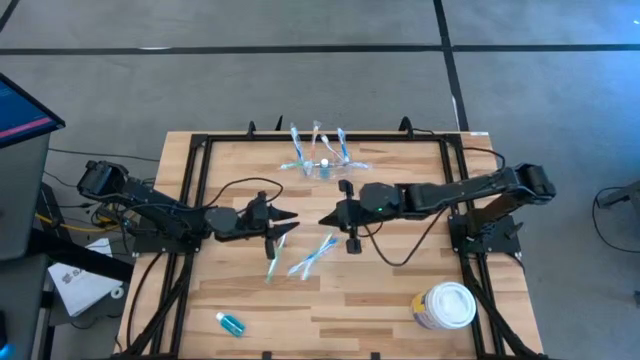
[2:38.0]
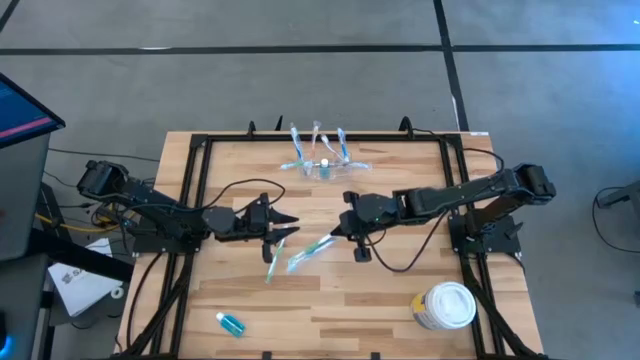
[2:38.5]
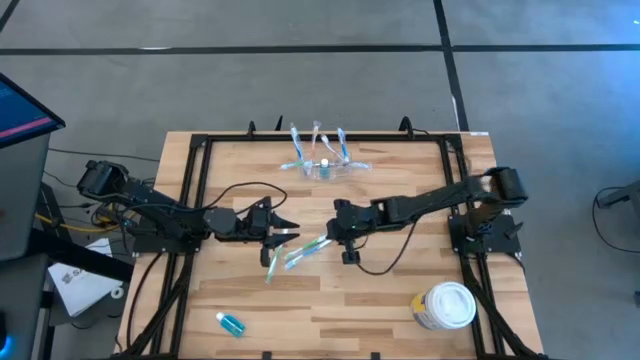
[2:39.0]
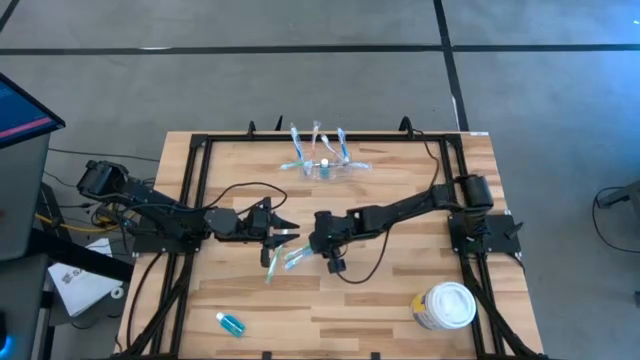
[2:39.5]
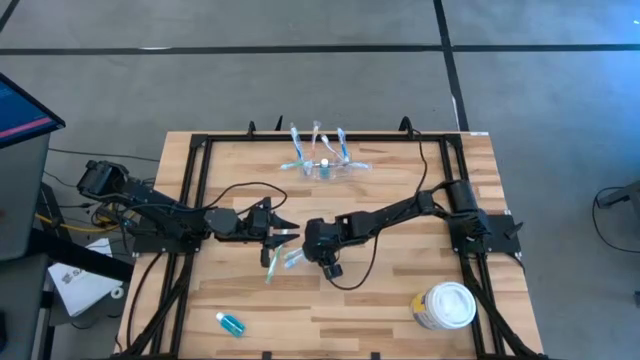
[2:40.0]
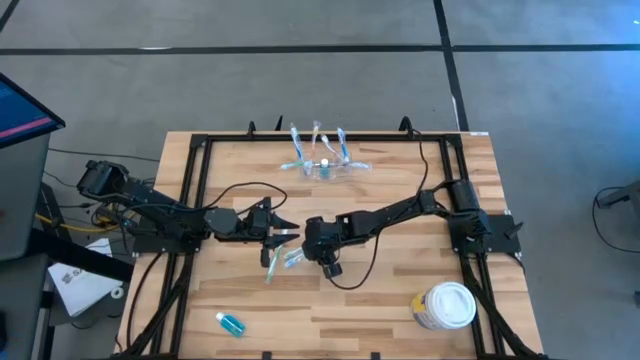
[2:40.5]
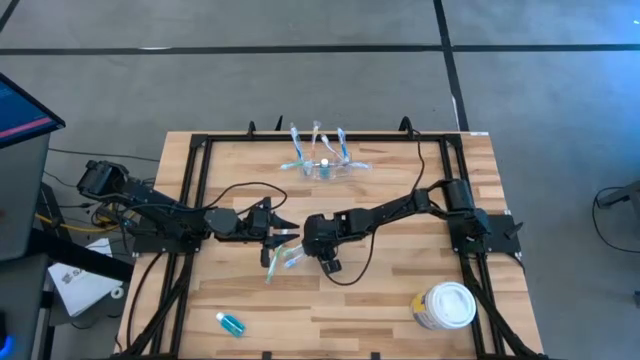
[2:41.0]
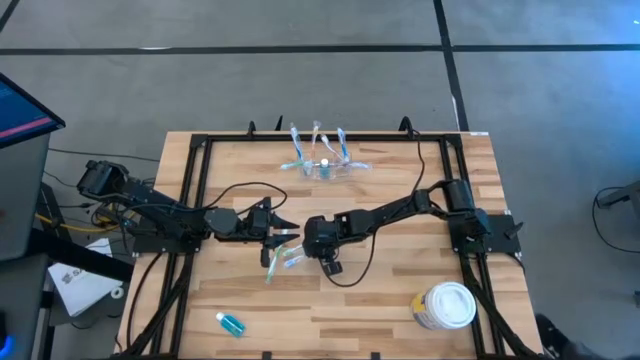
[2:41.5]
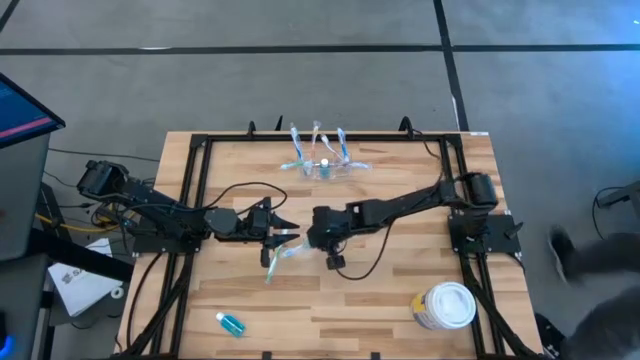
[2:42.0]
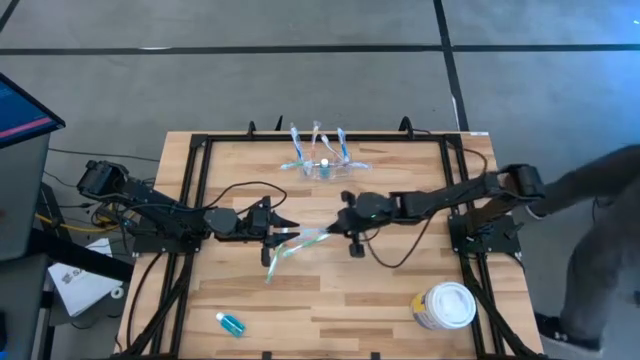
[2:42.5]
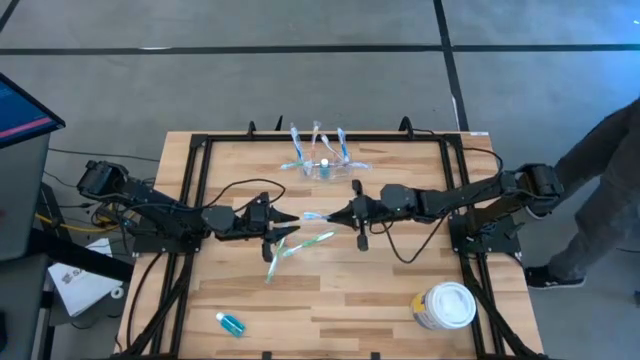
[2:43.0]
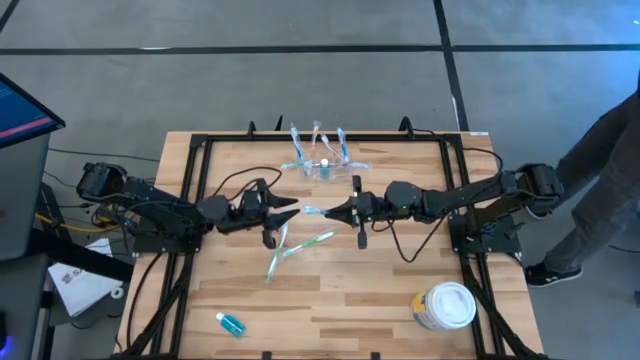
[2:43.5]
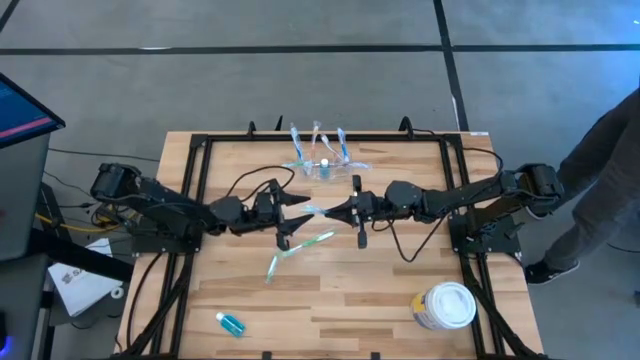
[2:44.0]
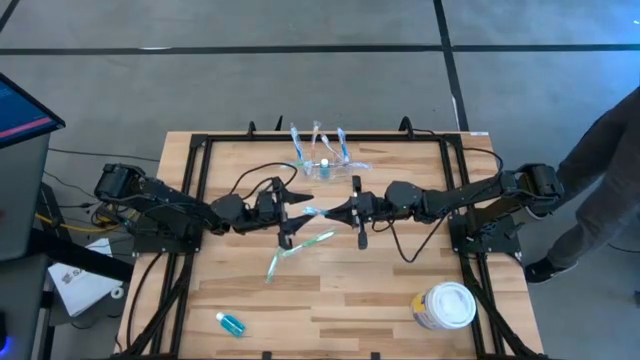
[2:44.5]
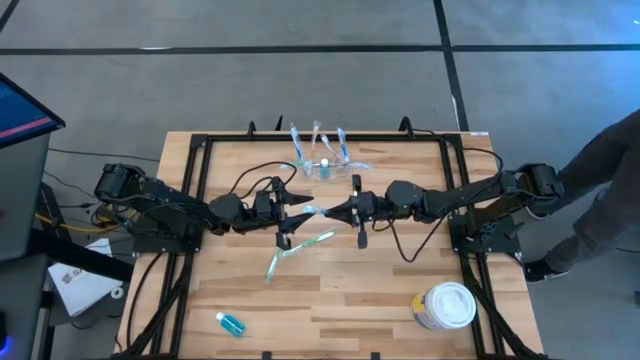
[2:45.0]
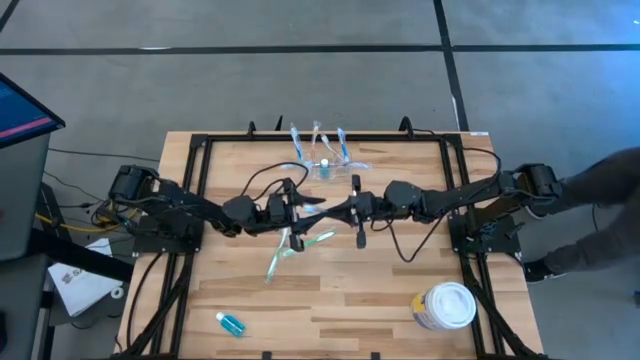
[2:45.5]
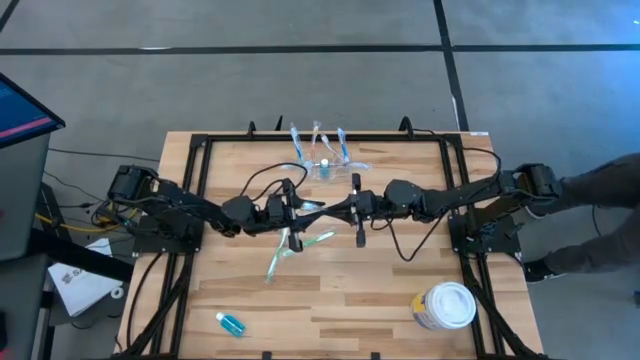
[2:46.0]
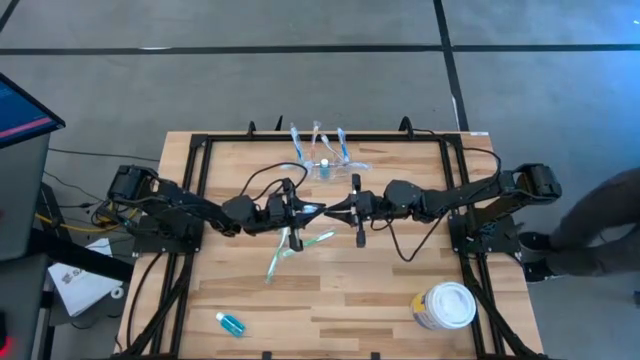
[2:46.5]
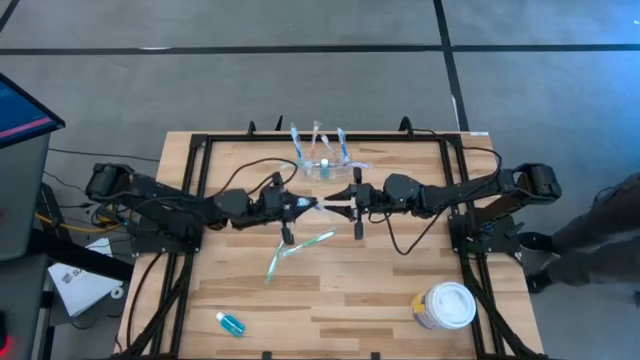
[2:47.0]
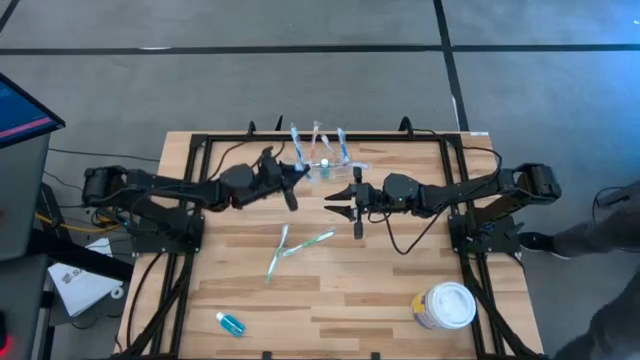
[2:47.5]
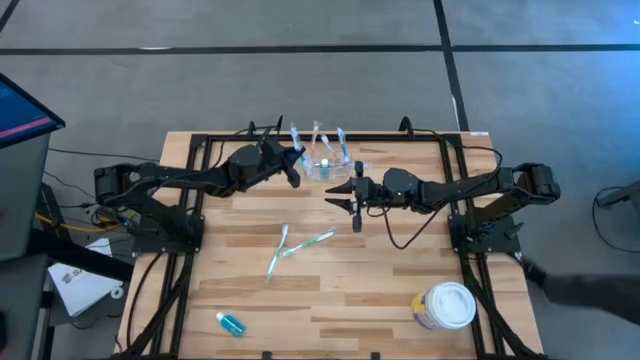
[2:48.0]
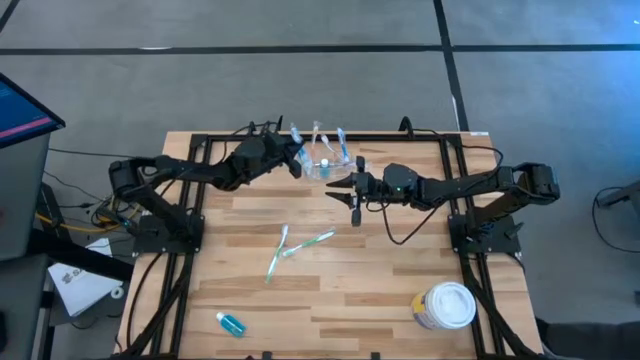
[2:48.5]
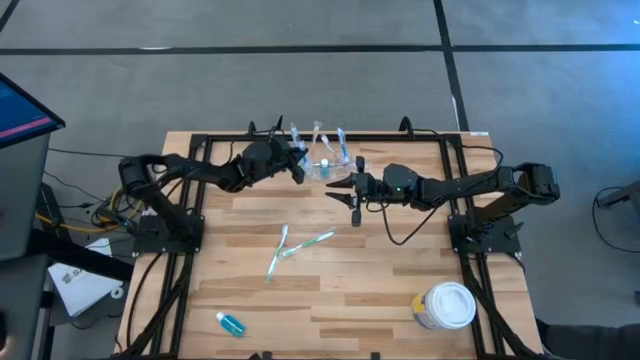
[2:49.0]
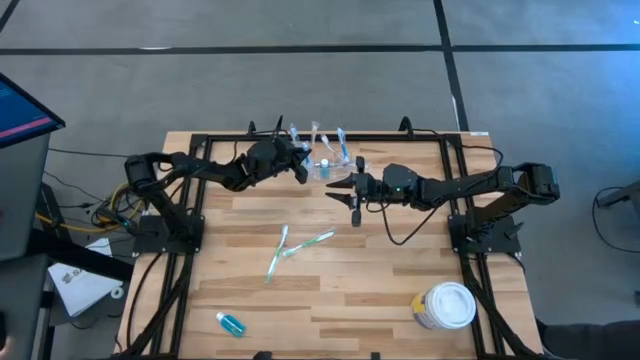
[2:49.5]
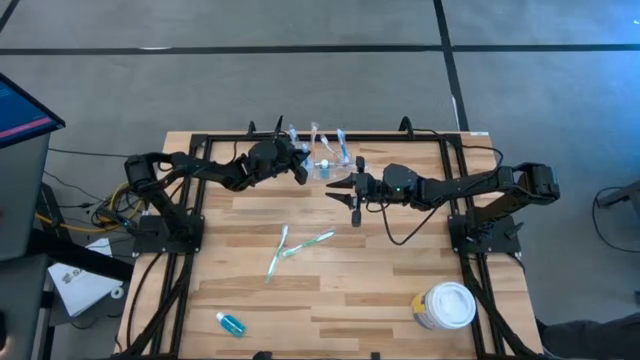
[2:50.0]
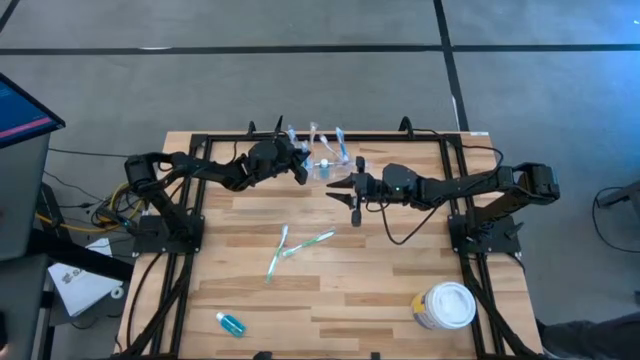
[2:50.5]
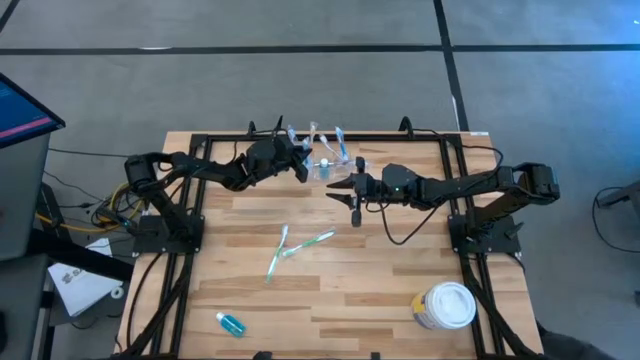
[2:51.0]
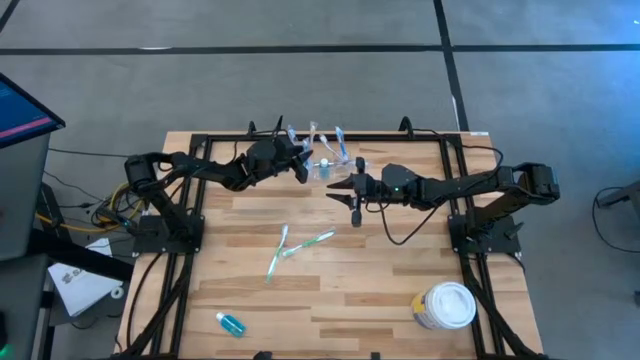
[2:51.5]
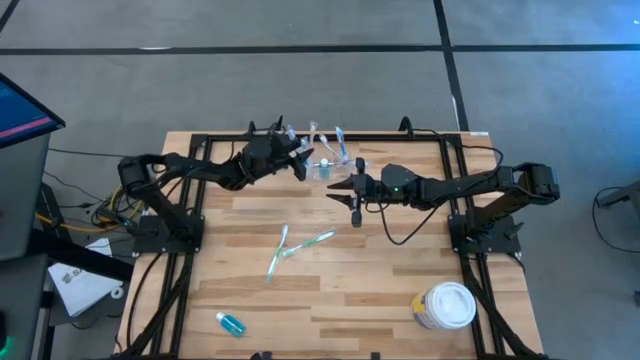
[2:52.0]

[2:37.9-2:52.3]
Task: Pick & Place toothbrushing station
Put the blue toothbrush into the transparent organizer

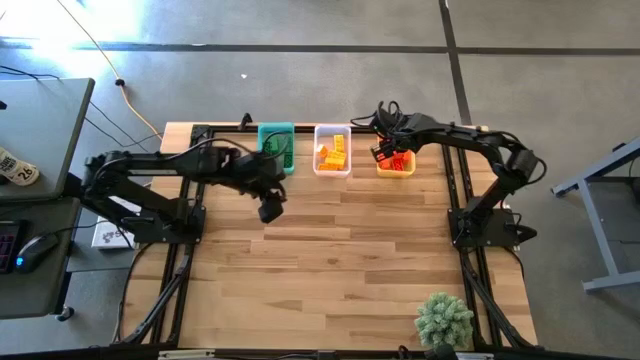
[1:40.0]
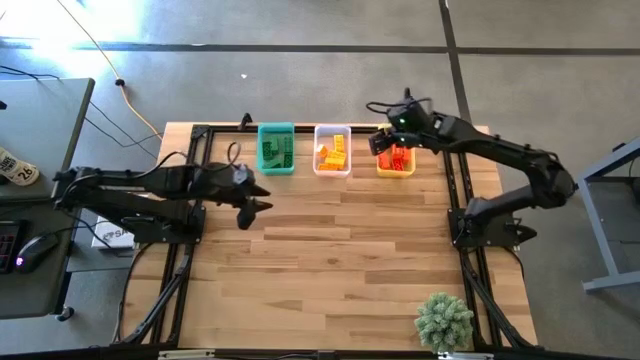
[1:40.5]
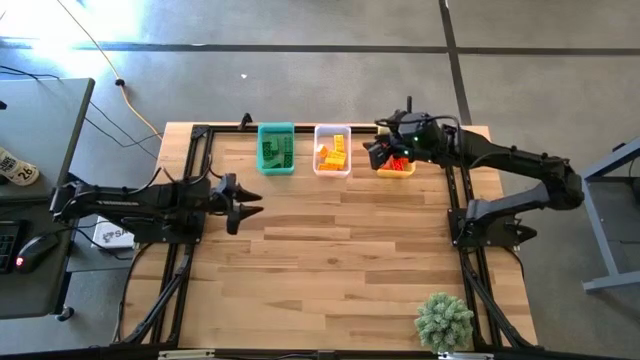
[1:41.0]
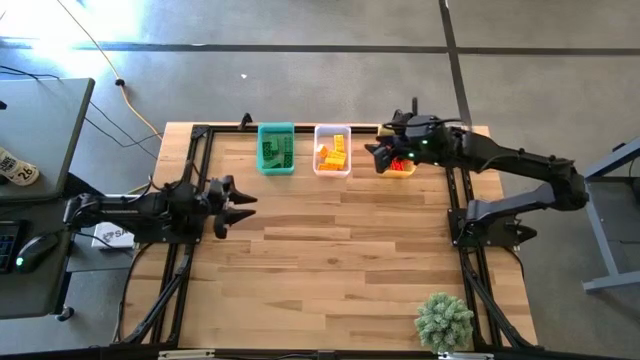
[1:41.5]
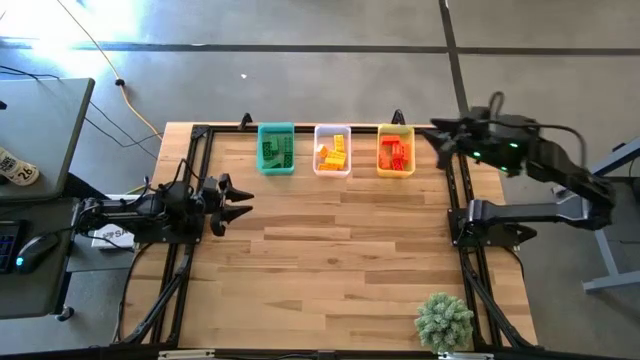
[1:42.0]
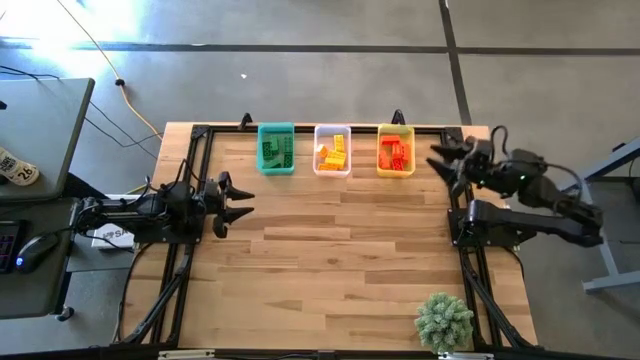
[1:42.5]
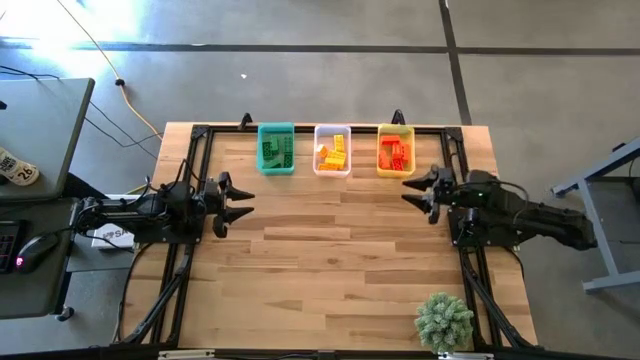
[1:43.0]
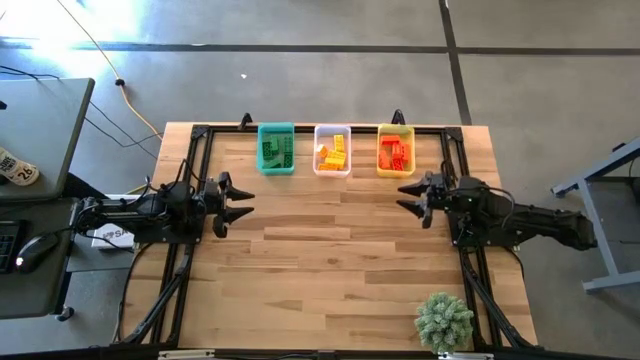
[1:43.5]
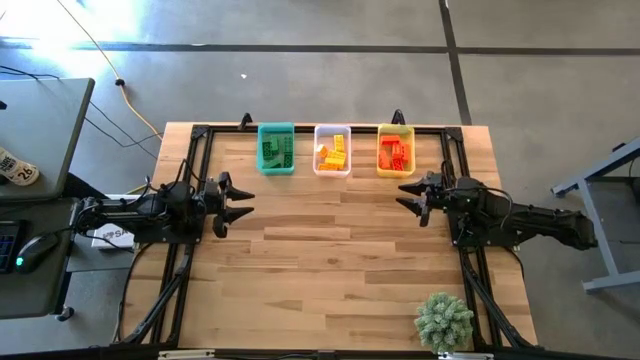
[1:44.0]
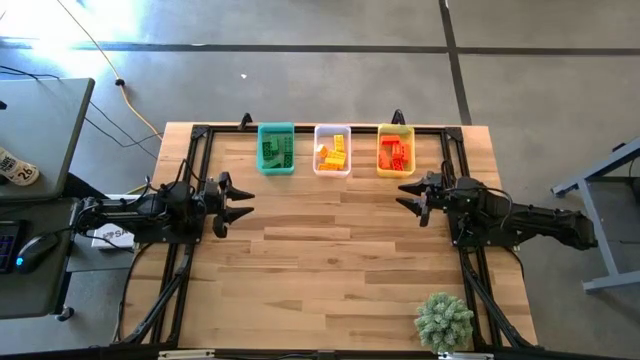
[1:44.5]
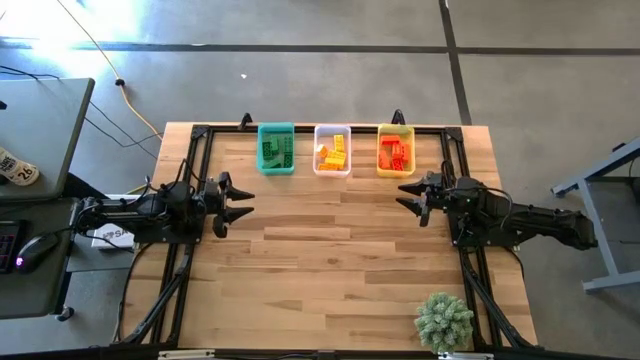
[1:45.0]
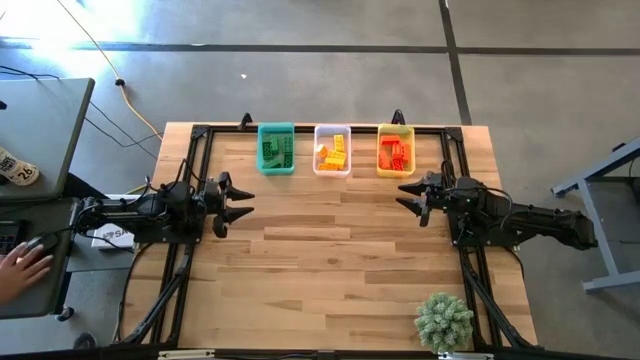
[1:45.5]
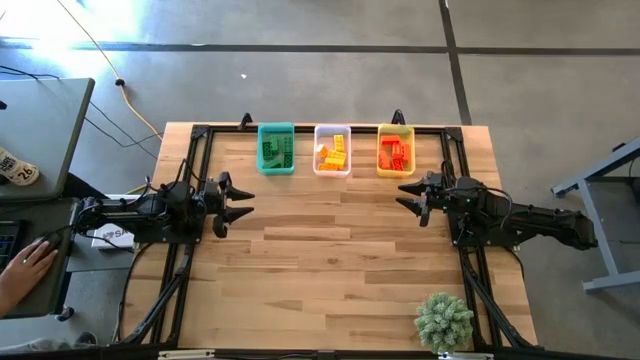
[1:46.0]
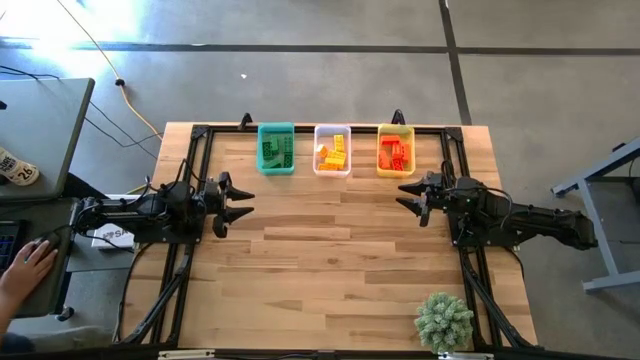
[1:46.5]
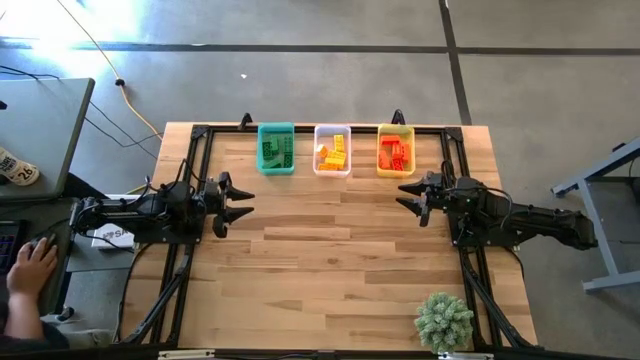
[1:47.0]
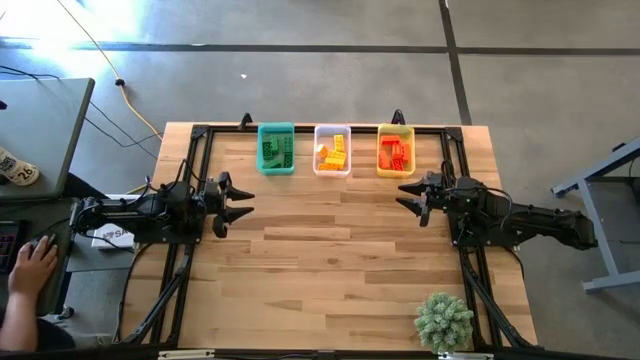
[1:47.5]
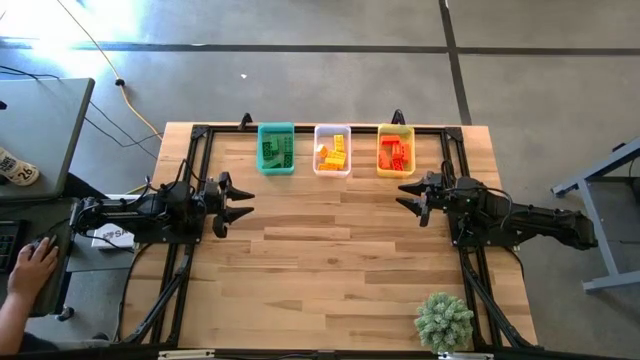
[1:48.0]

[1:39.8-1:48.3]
Task: Sort & place blocks by color
Return to Home Position
